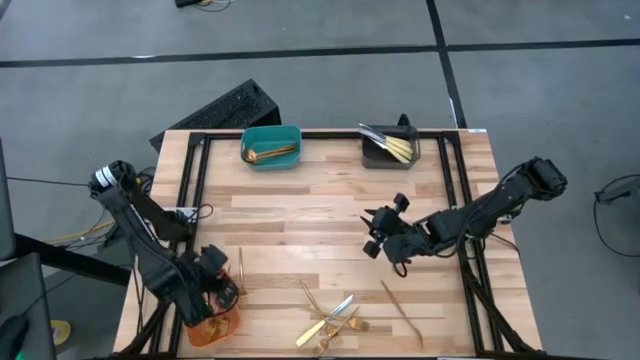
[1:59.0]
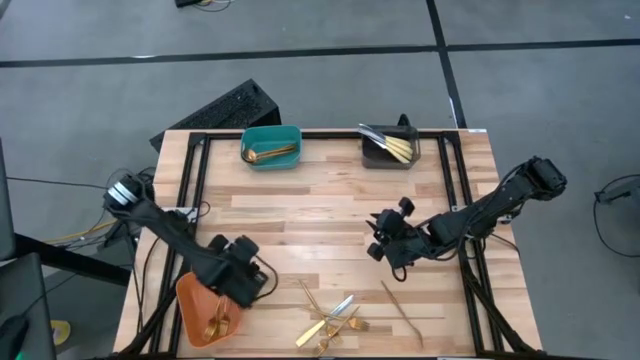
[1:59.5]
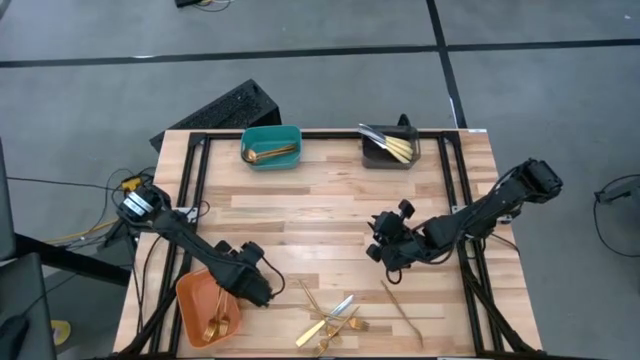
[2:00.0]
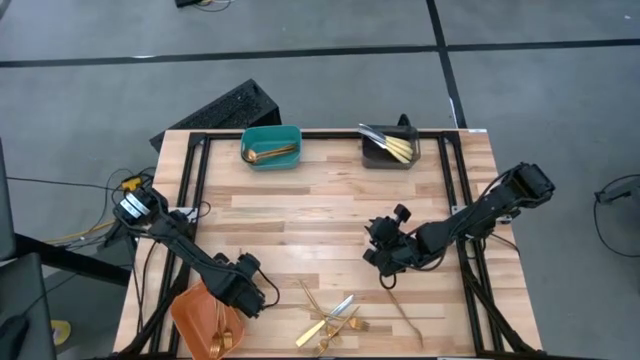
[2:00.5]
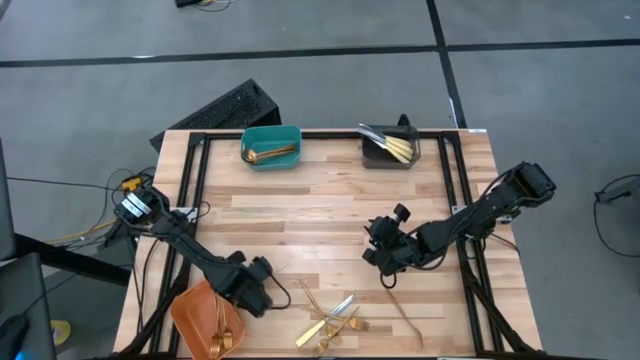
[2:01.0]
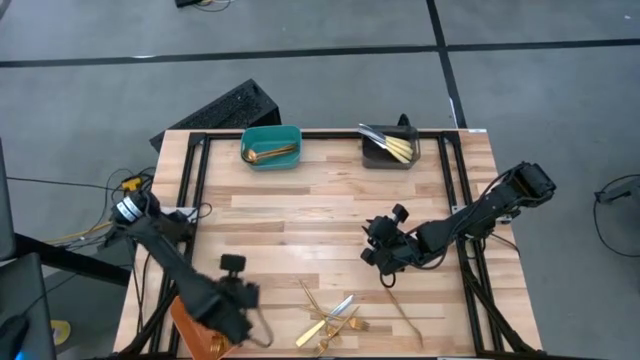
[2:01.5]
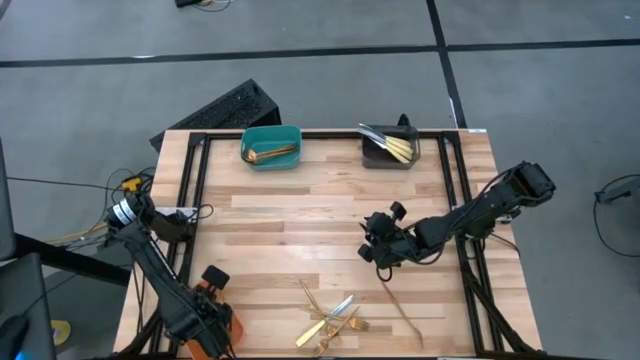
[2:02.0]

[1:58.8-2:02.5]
Task: Sort silverware by color (type)
Put the gold fork into the orange bin

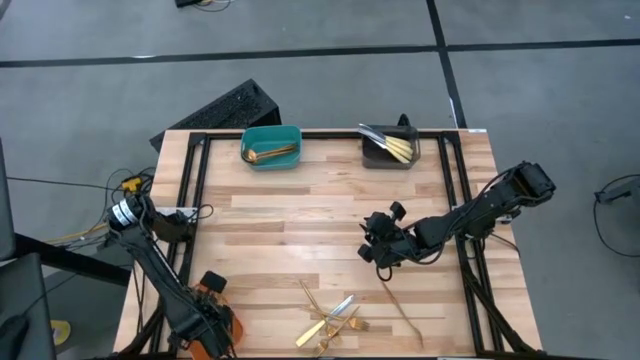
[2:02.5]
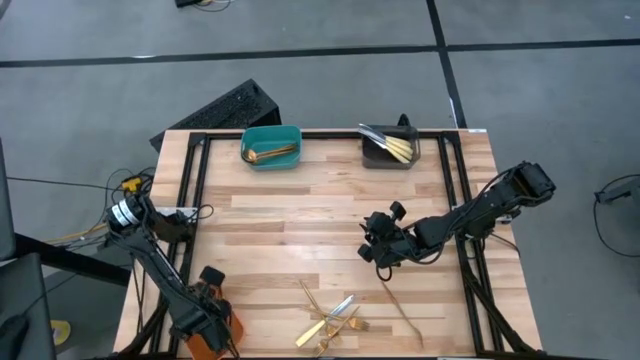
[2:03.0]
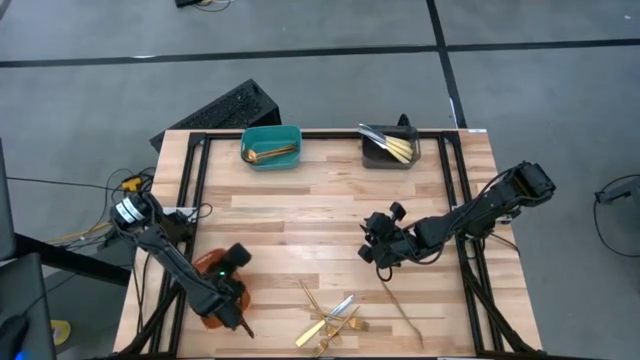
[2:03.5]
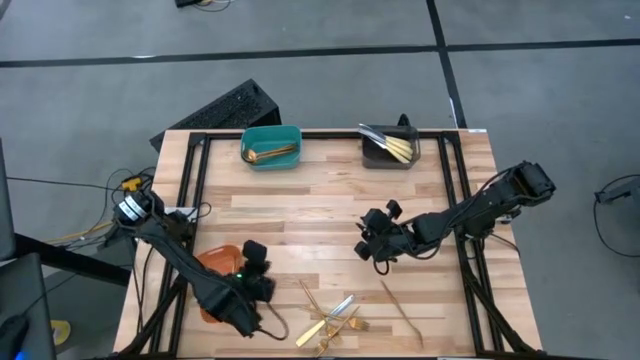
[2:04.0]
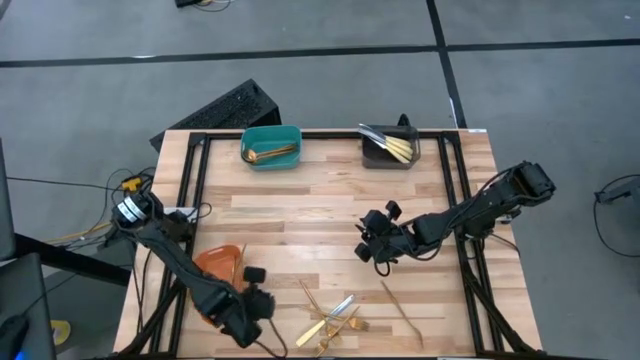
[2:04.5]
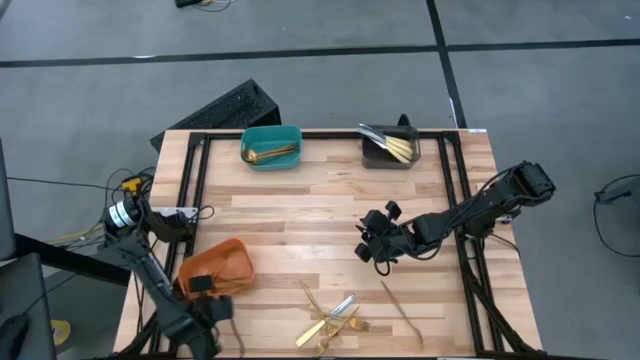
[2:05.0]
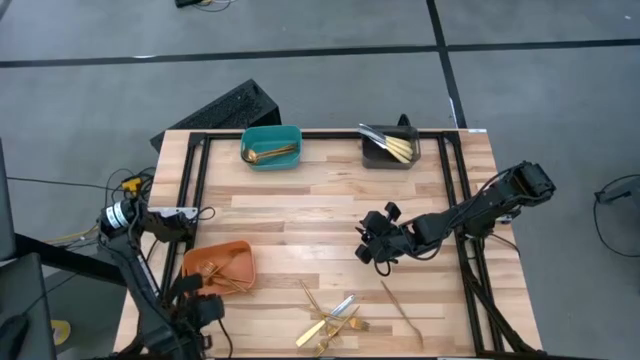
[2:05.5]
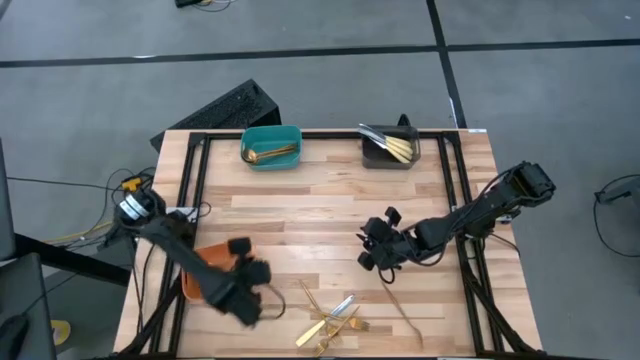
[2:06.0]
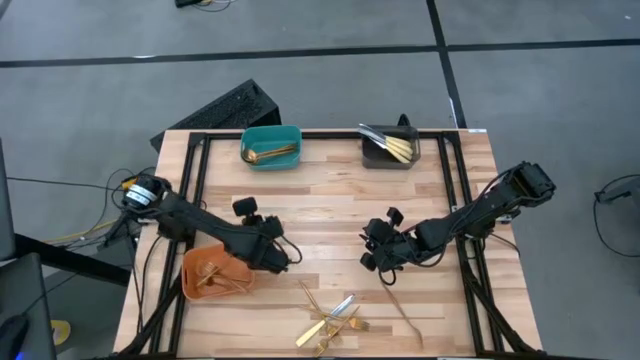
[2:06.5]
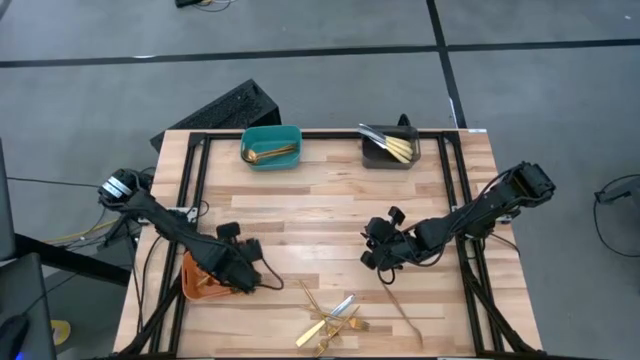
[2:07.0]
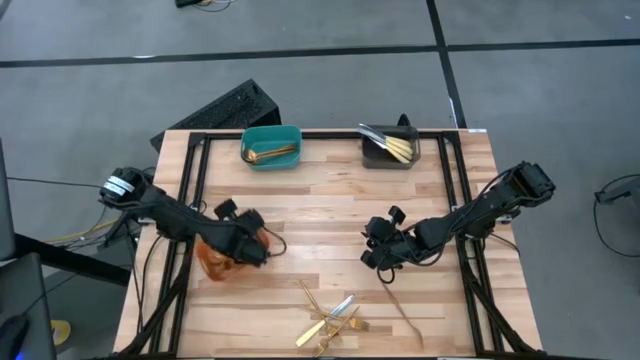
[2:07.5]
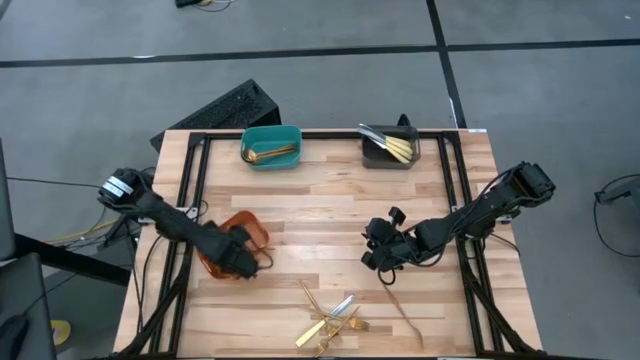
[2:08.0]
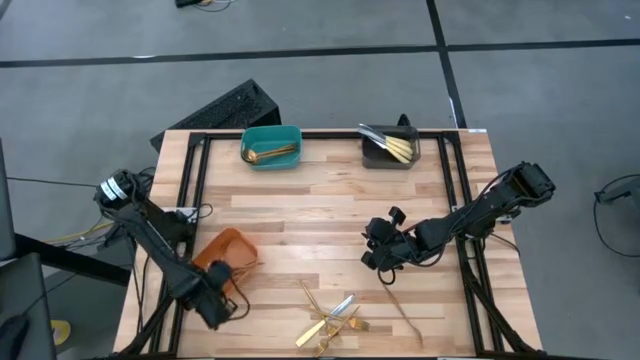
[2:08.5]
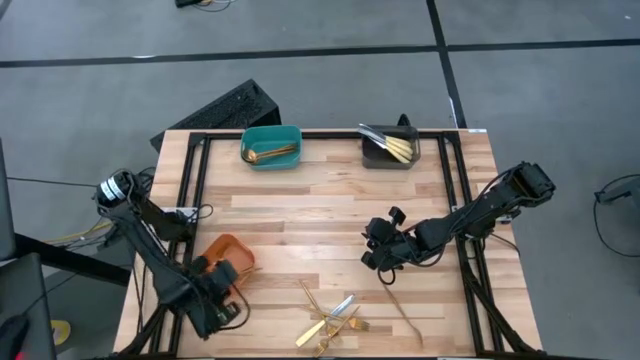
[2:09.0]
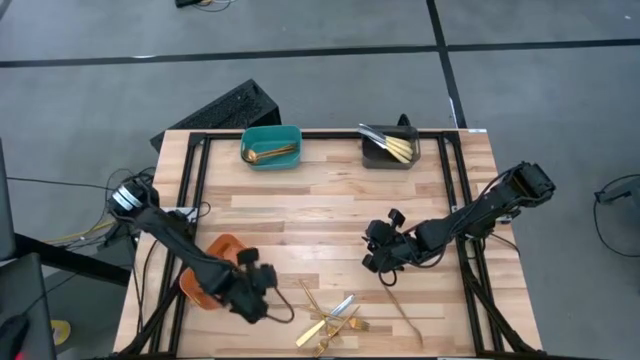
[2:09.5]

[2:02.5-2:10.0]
Adjust the orange bin

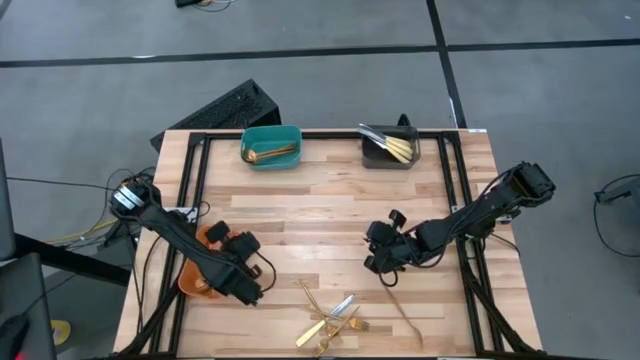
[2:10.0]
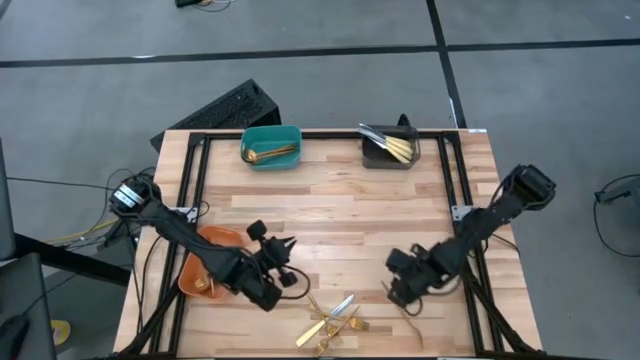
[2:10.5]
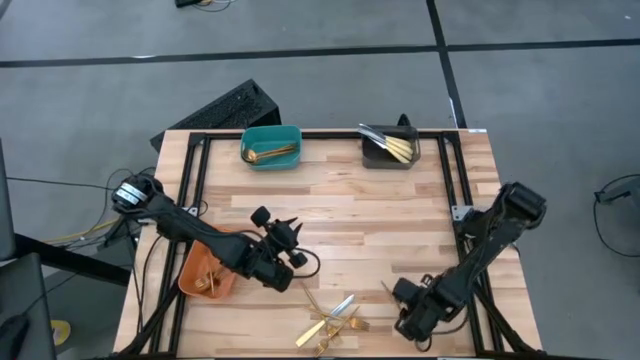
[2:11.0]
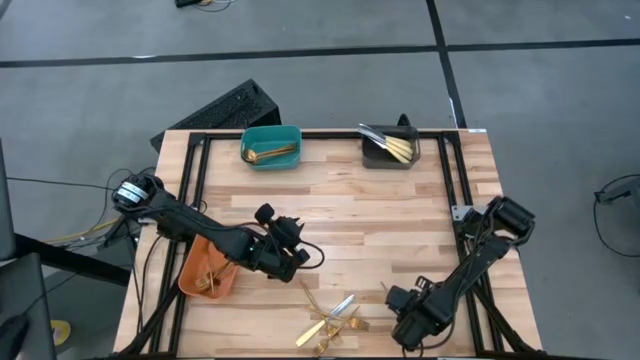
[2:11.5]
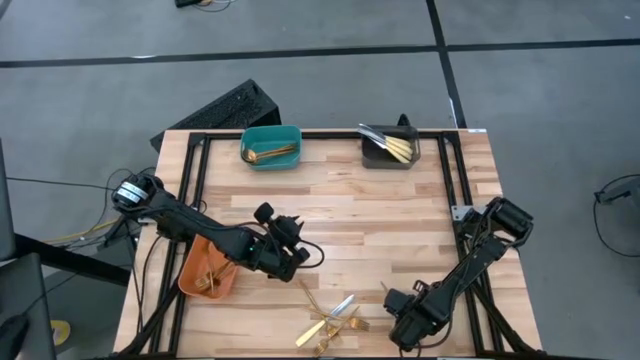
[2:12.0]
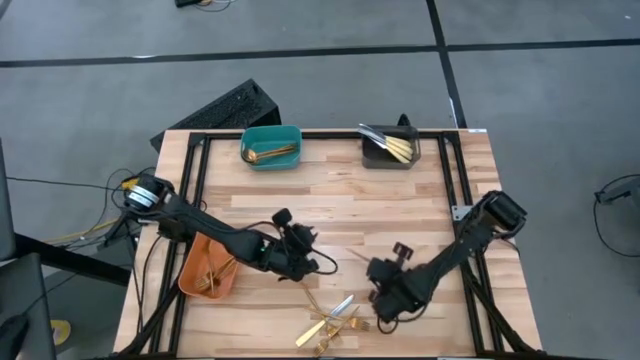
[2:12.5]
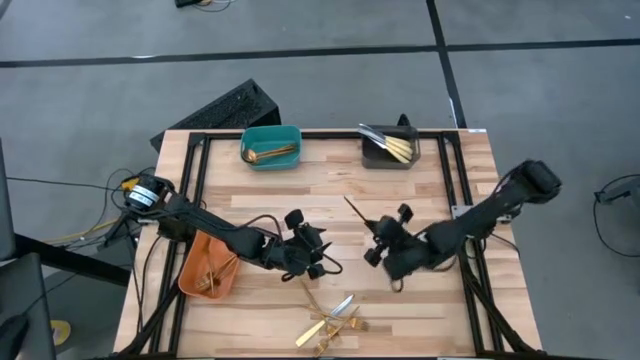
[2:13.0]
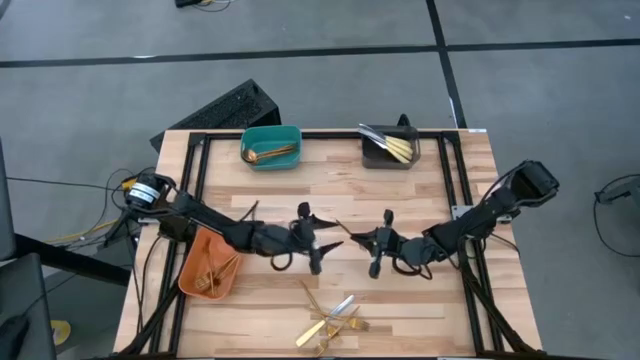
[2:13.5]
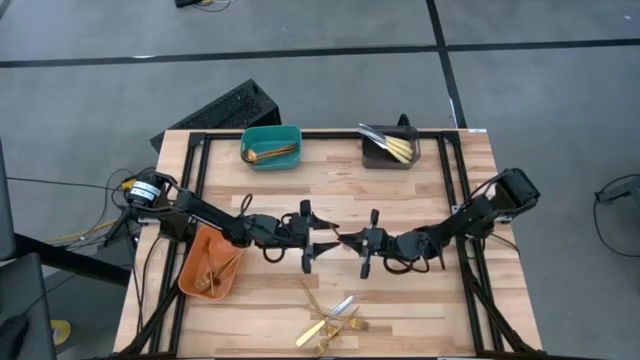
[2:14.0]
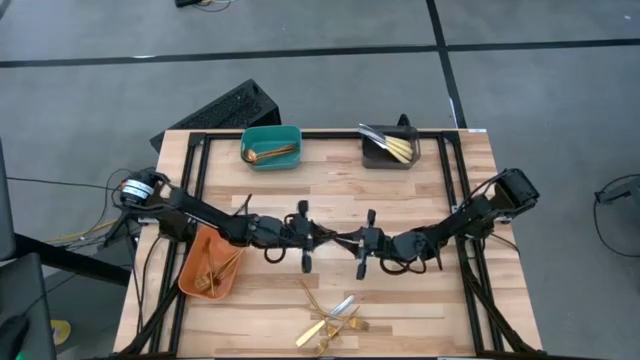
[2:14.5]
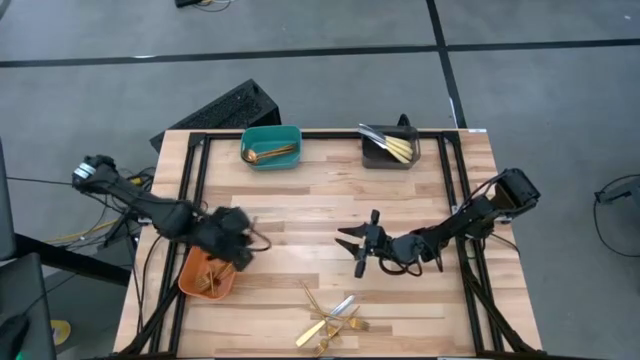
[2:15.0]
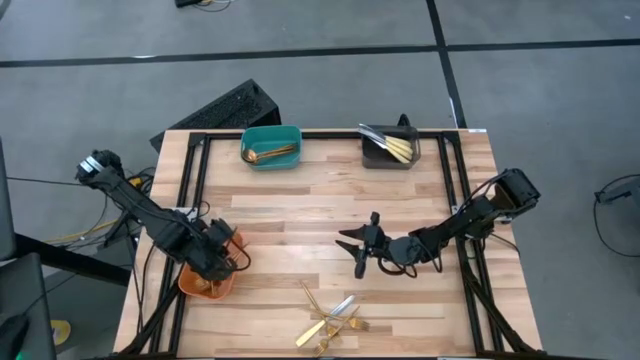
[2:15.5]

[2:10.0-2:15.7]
Put the gold fork into the orange bin

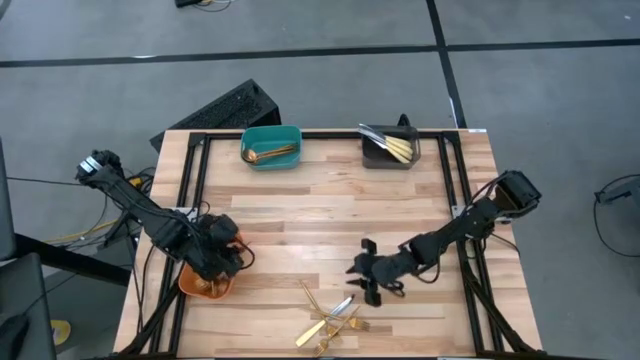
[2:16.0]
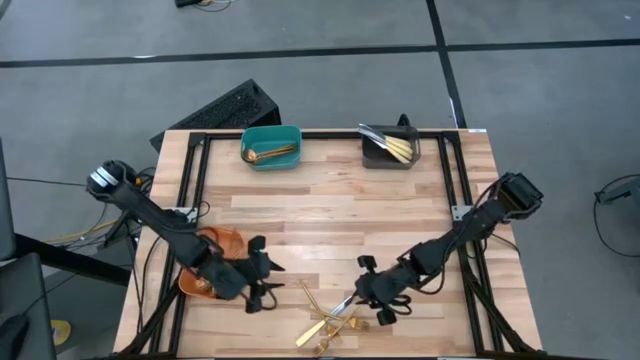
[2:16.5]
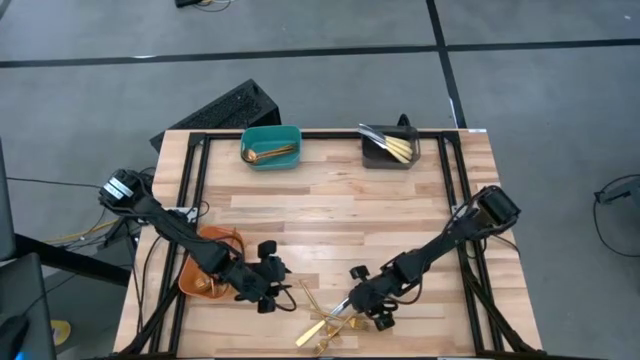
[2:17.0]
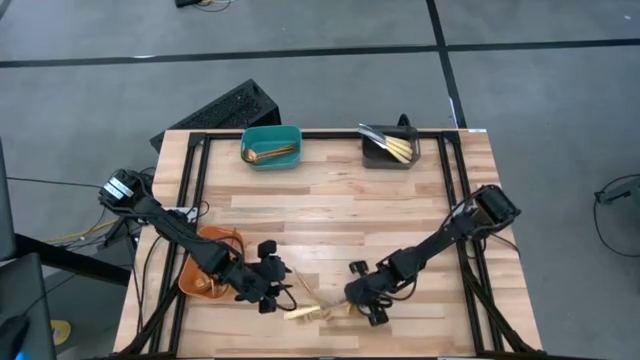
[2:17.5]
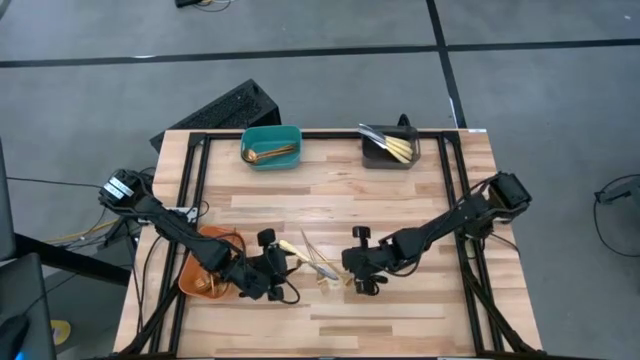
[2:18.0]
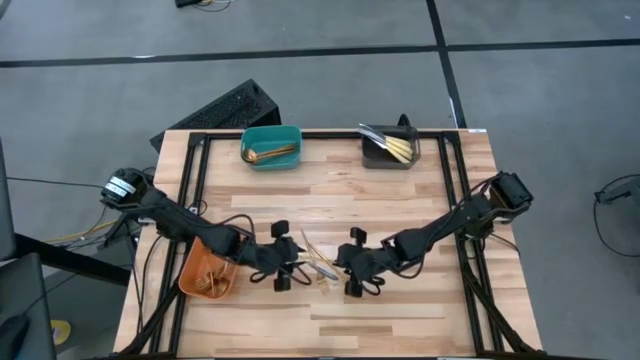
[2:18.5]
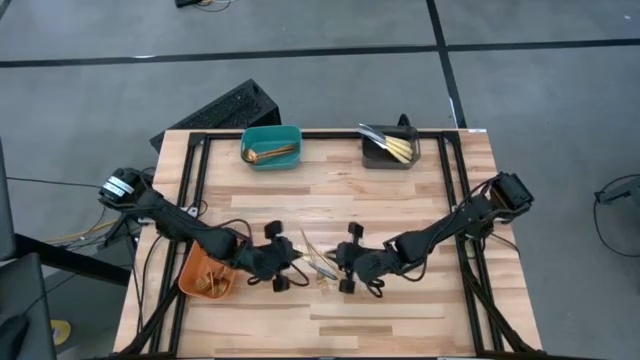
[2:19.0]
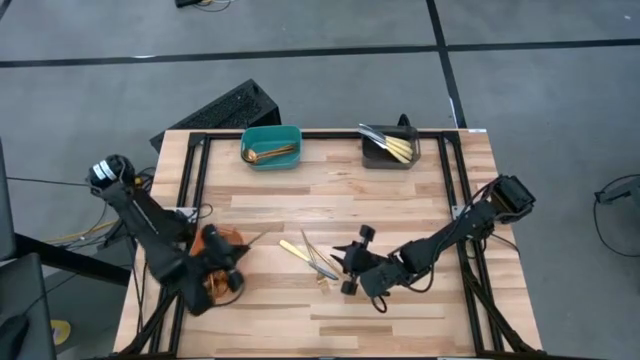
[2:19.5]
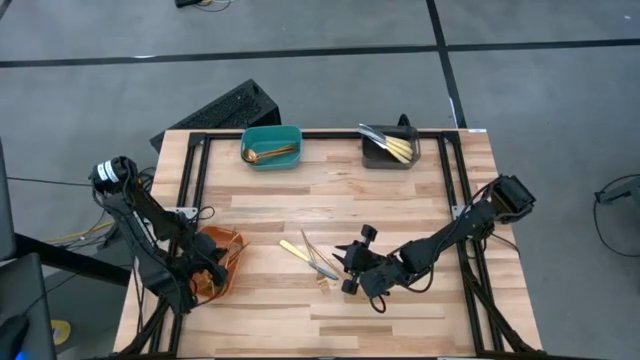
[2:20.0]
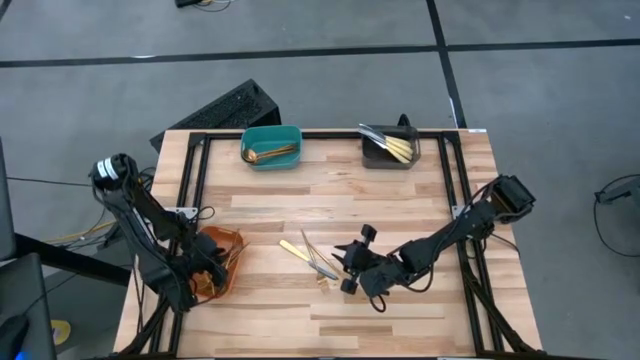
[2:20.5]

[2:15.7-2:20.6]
Put the gold fork into the orange bin
